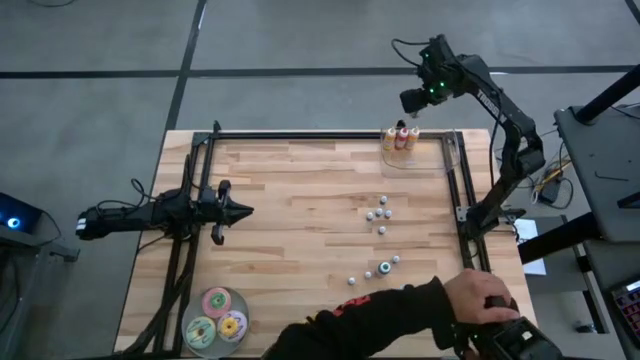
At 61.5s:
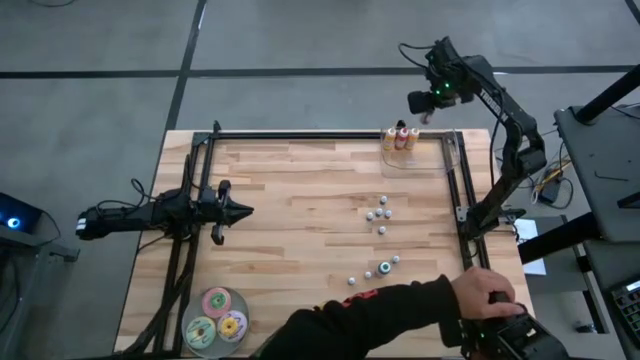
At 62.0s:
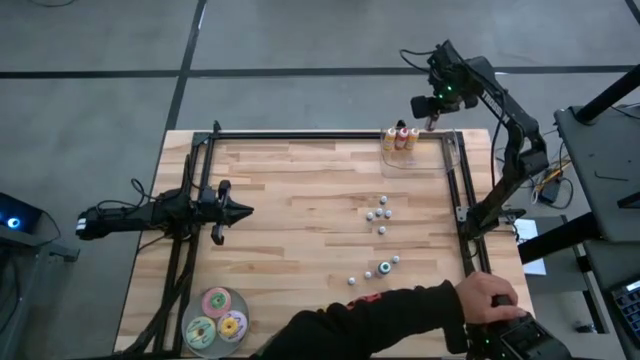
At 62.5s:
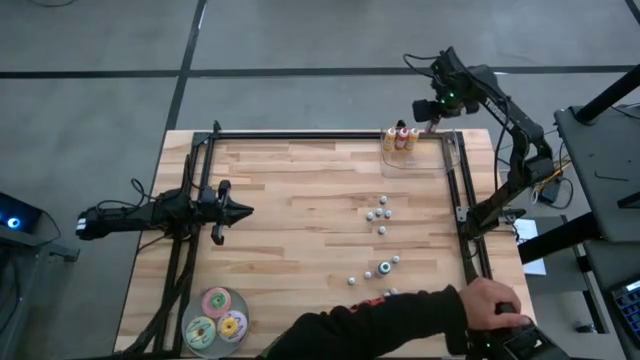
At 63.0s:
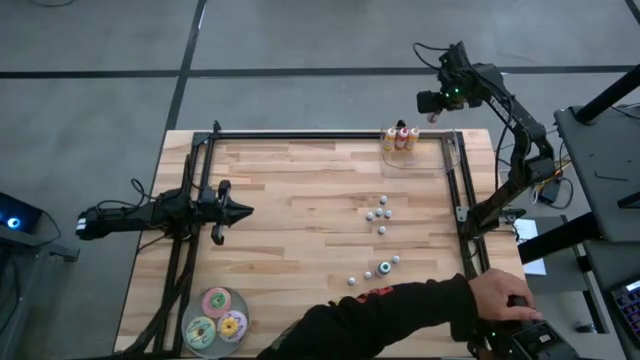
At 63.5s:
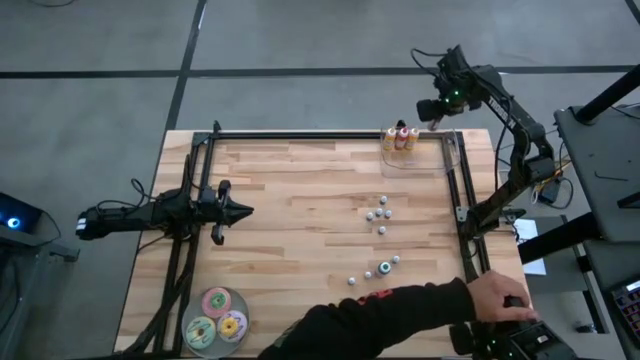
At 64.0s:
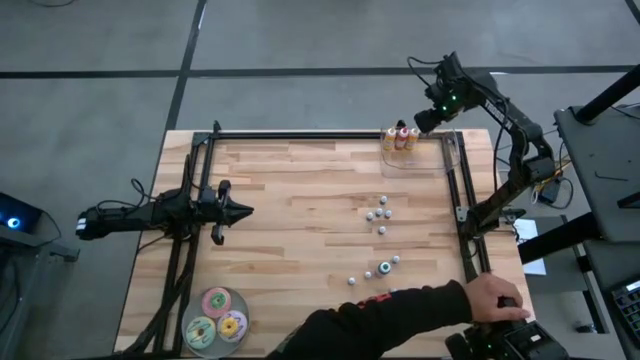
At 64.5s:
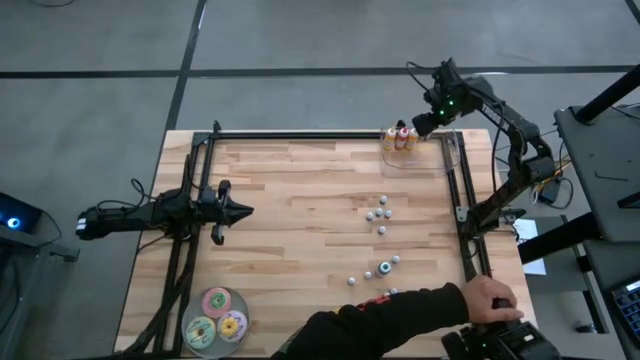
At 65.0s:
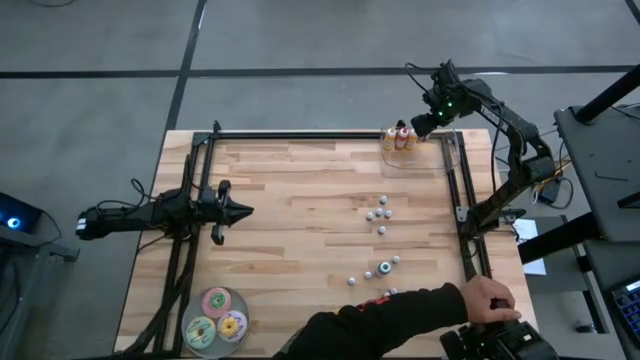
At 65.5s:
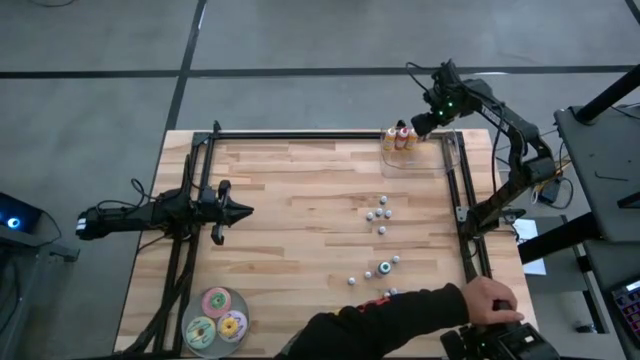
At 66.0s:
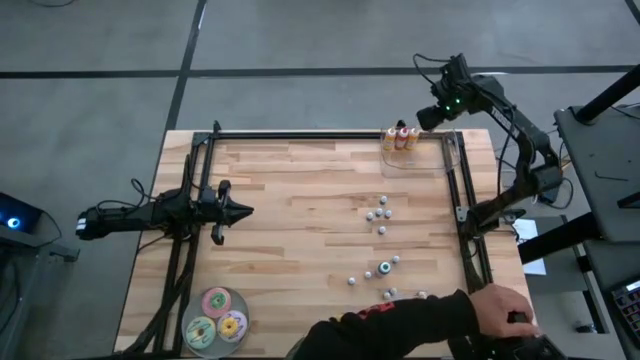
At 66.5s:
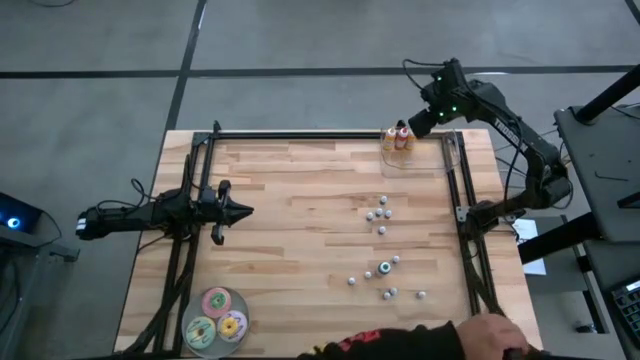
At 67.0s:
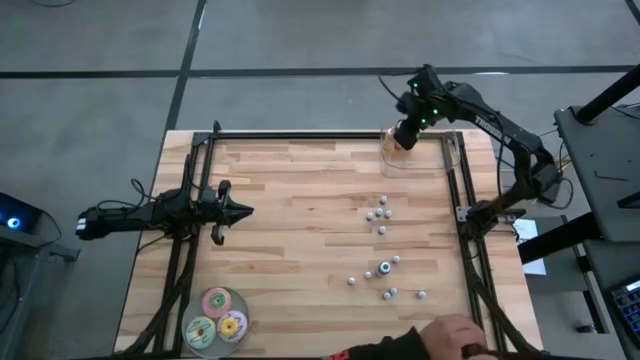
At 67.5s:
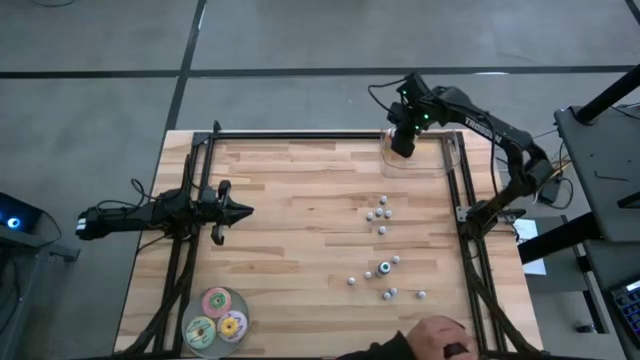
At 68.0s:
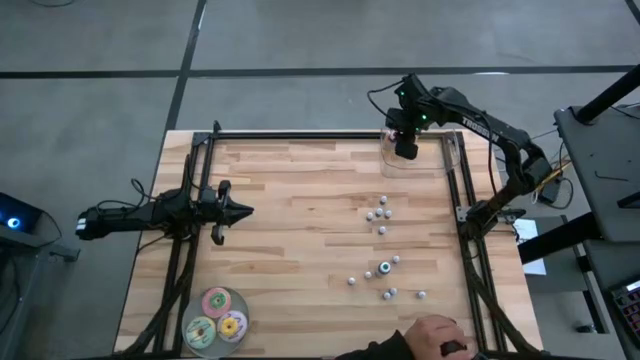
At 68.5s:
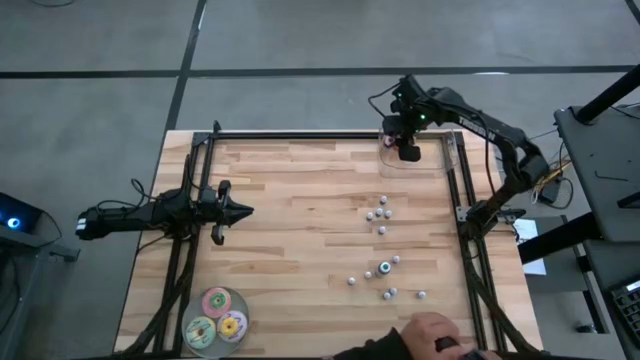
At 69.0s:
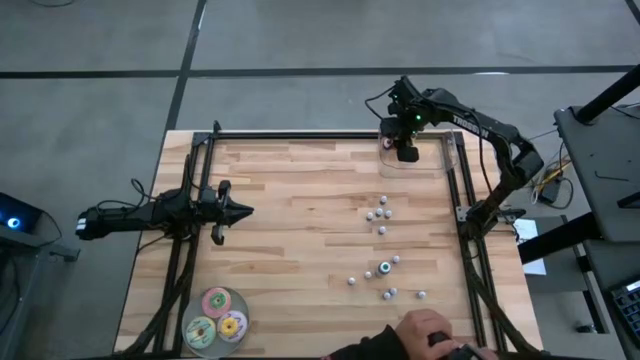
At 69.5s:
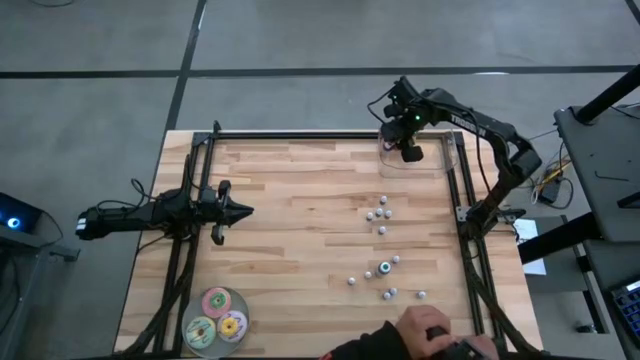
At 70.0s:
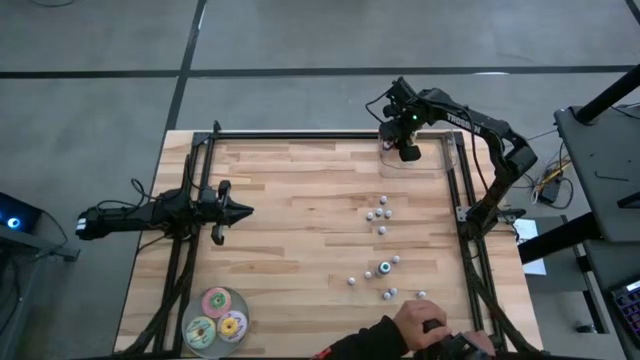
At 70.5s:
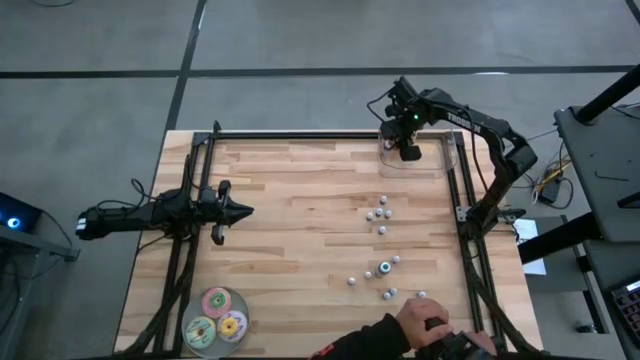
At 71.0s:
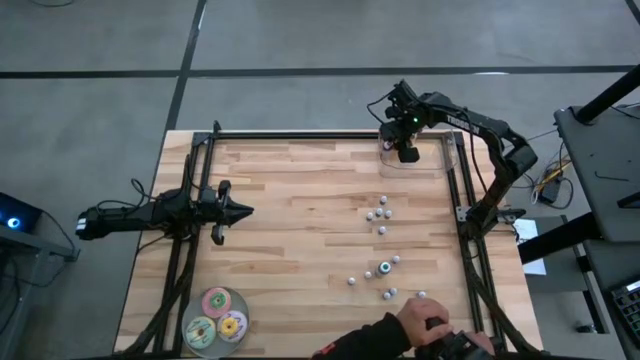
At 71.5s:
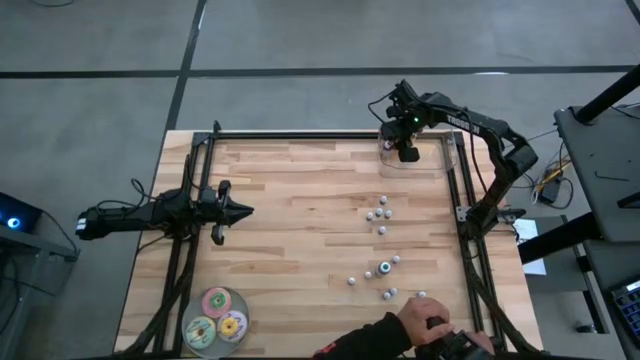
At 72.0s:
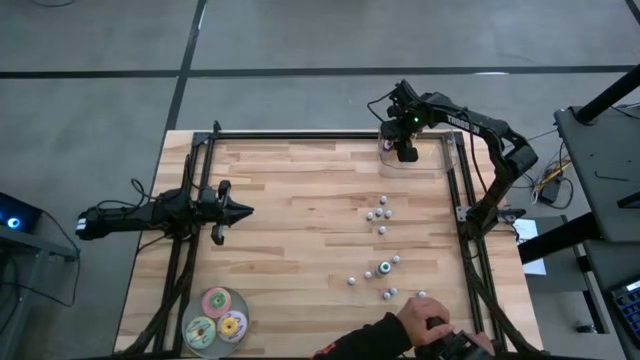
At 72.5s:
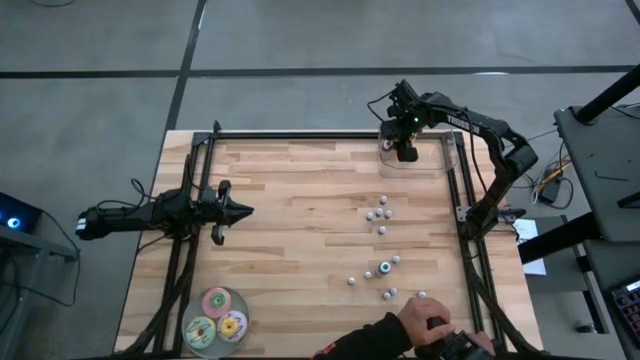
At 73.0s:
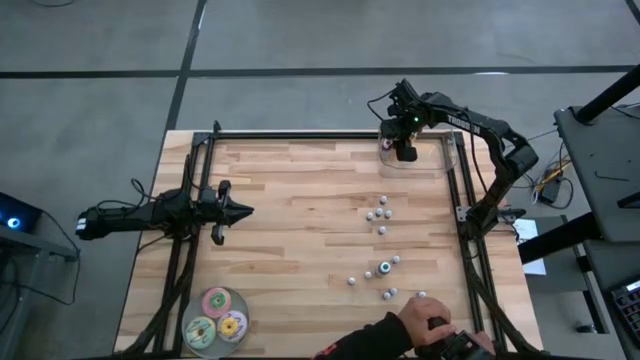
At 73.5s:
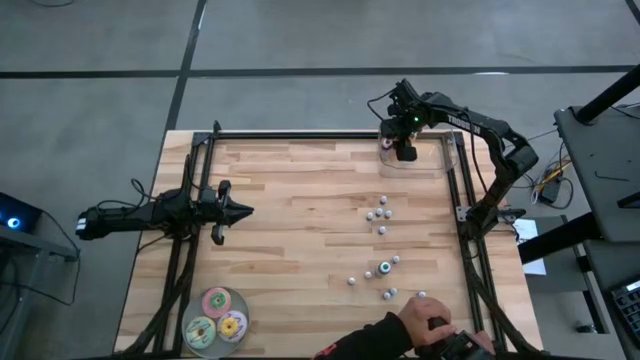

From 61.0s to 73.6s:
Task: Pick & Place food coloring
Put the big red food coloring bottle into the bin

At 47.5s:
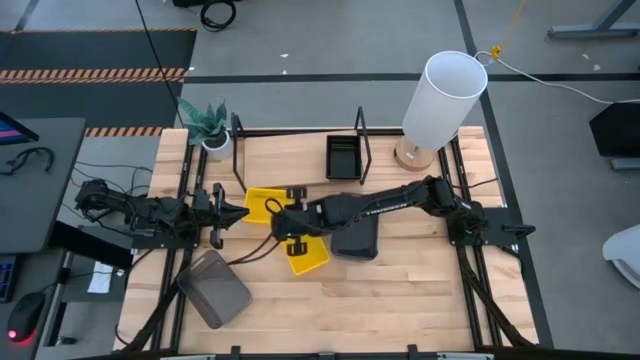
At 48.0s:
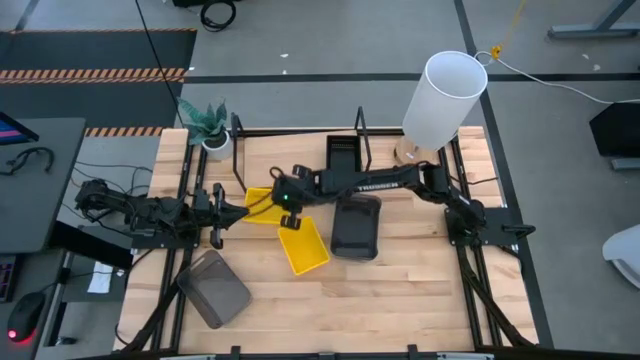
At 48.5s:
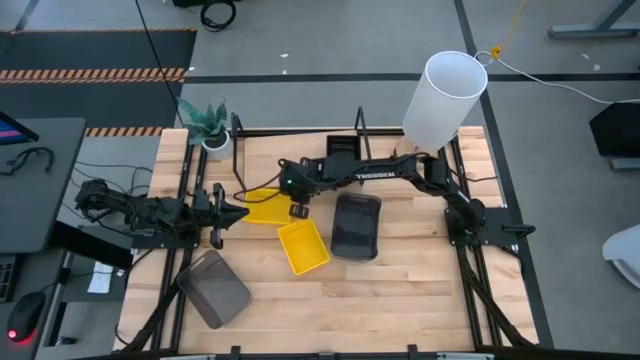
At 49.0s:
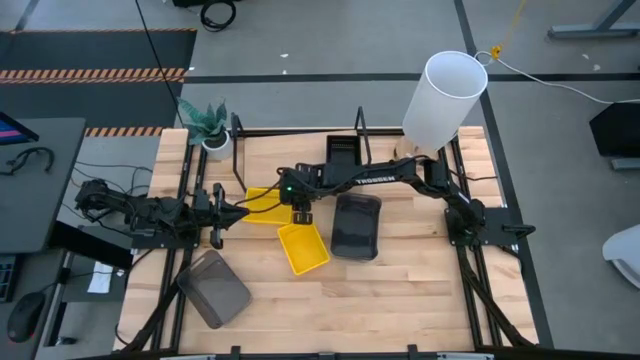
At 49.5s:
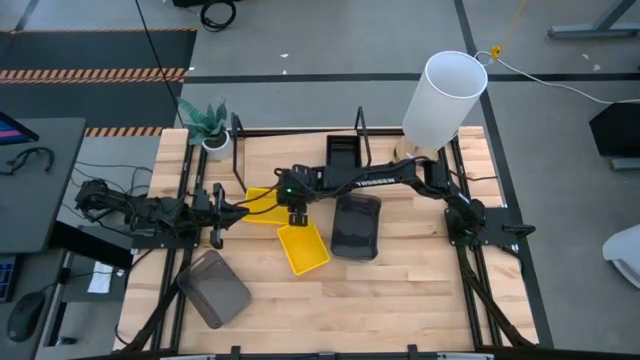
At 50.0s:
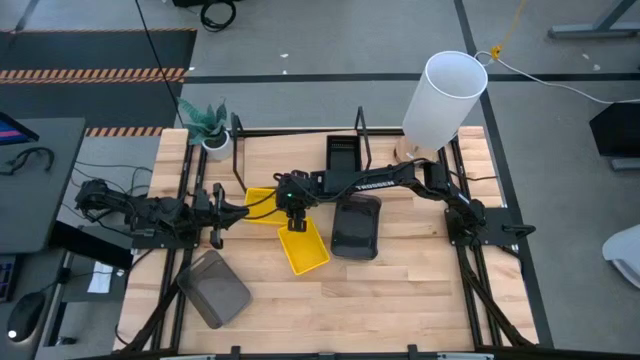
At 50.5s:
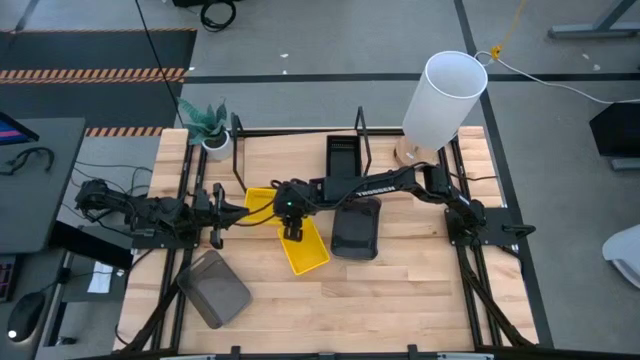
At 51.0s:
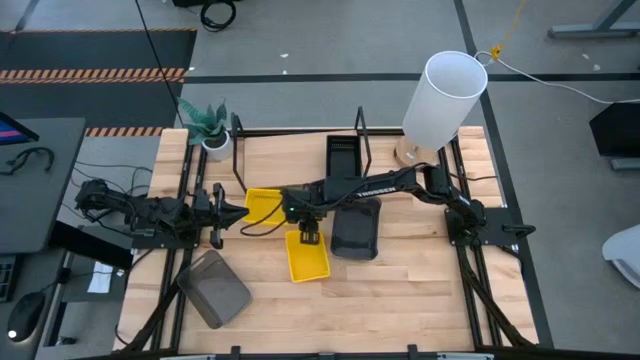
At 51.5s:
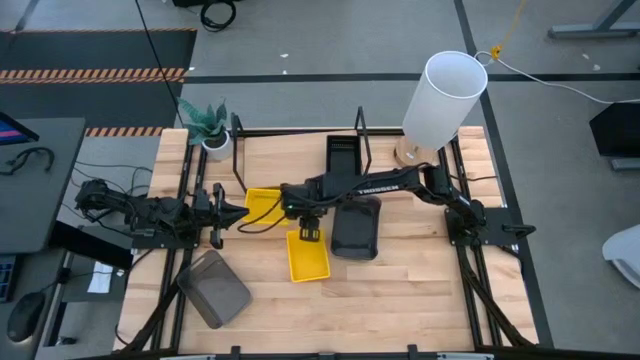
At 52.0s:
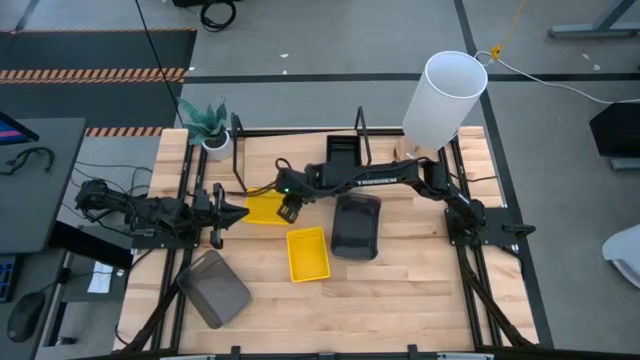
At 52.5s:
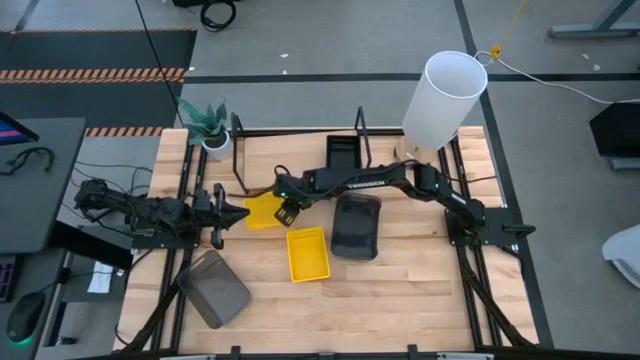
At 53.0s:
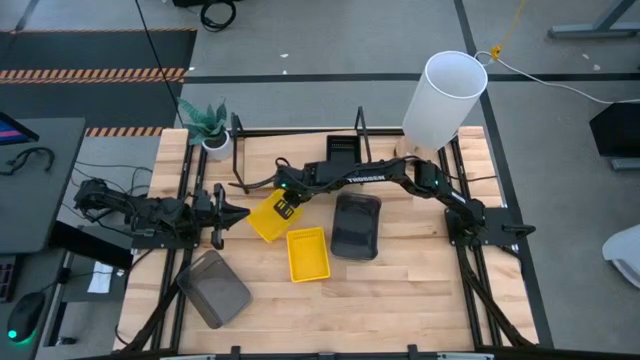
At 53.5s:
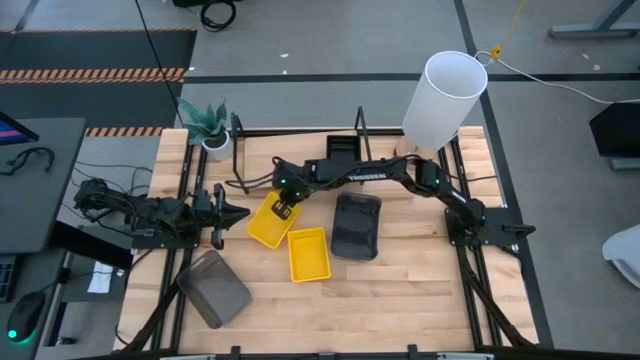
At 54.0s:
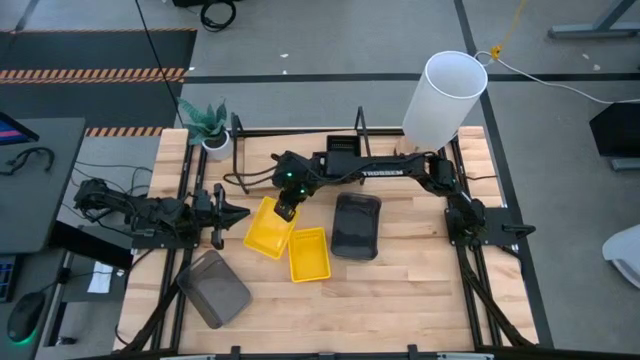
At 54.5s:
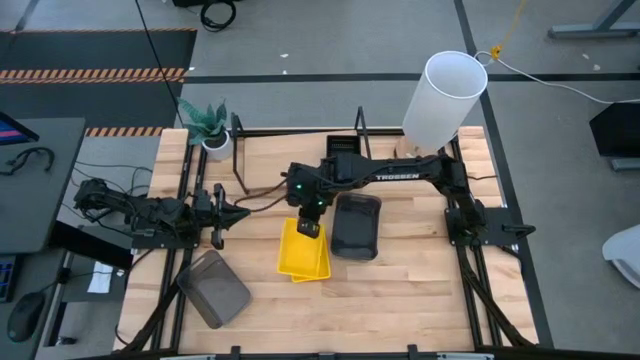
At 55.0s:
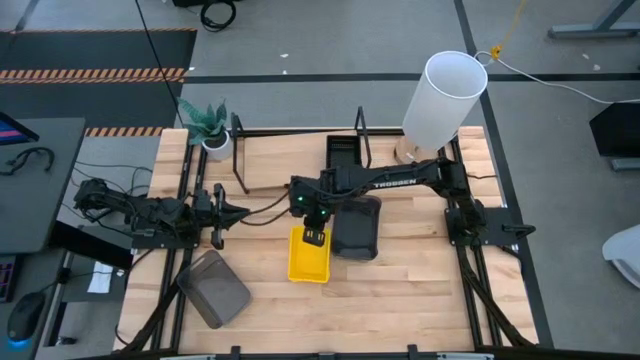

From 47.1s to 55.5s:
Task: Stack baskets on shelf by color
Stack the yellow bin on the yellow bin
